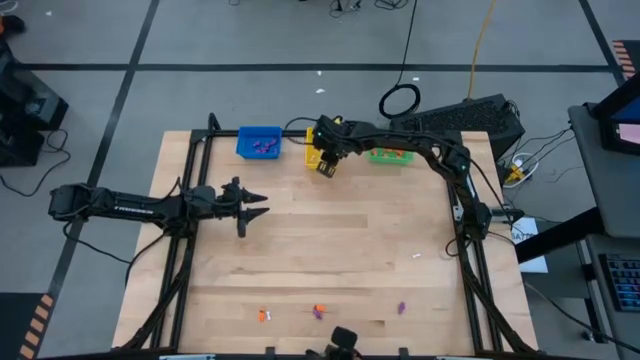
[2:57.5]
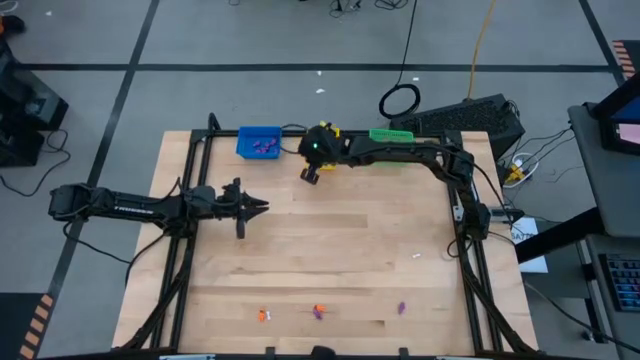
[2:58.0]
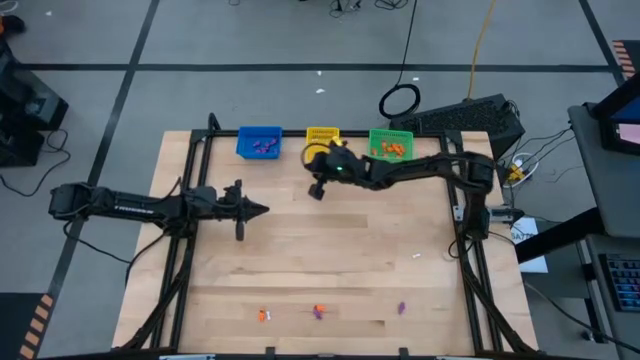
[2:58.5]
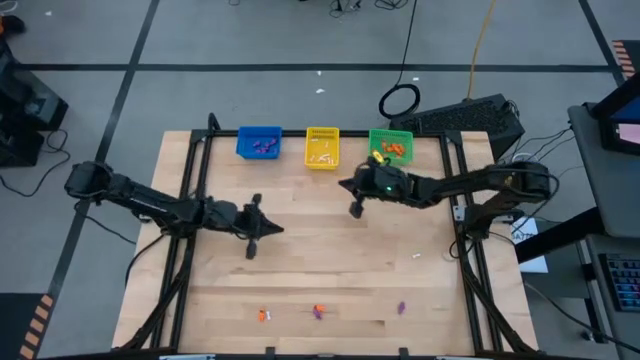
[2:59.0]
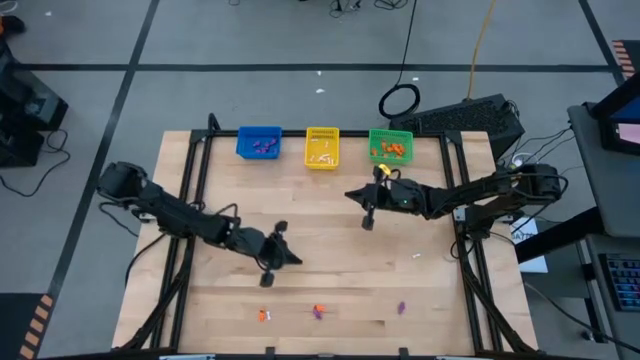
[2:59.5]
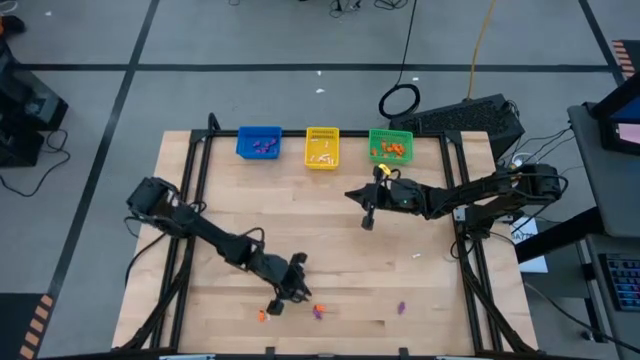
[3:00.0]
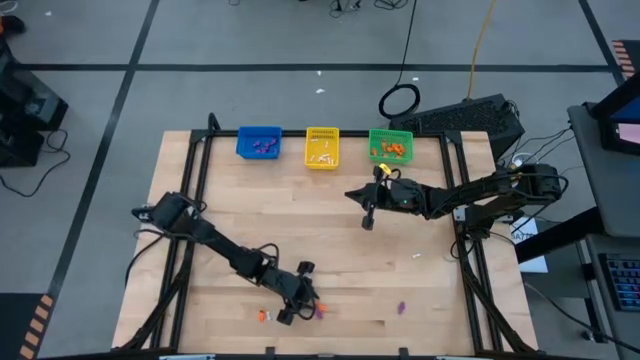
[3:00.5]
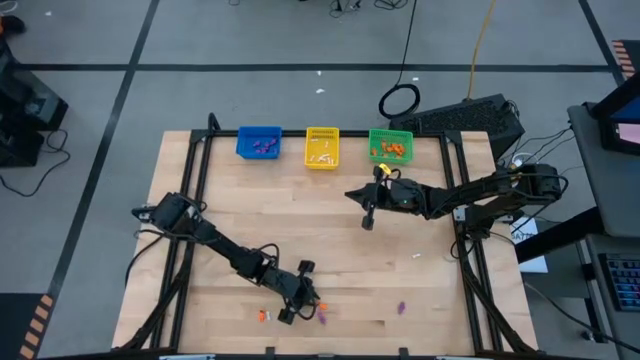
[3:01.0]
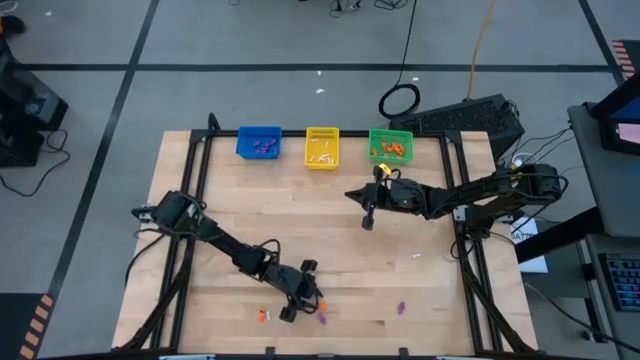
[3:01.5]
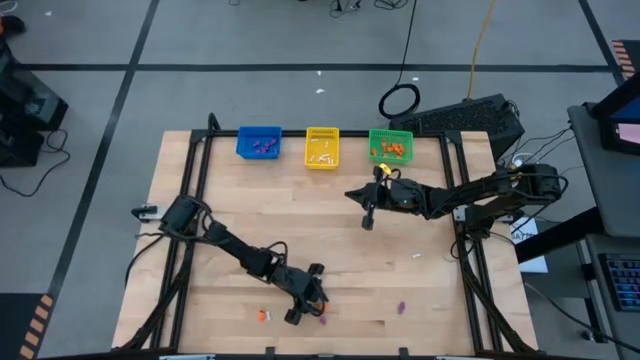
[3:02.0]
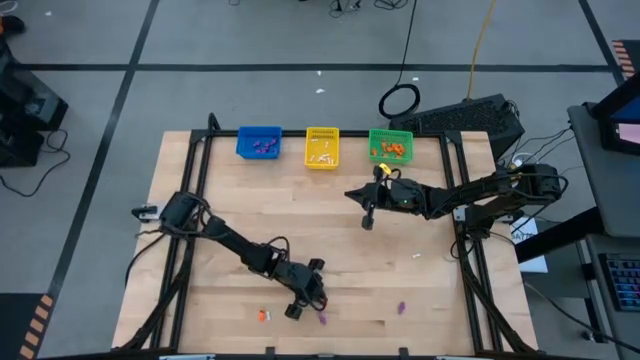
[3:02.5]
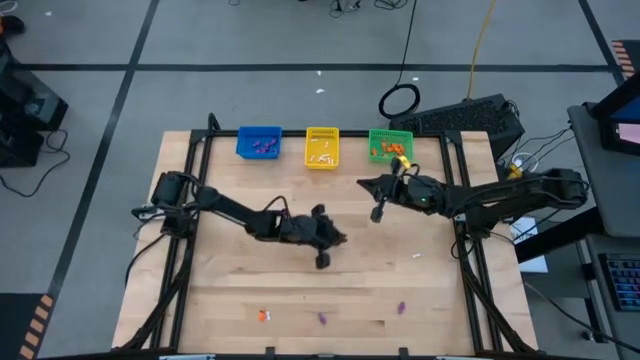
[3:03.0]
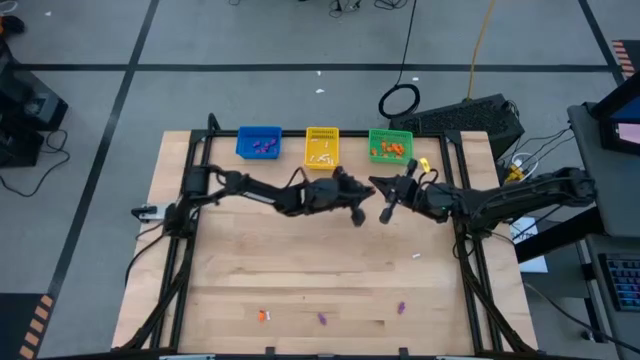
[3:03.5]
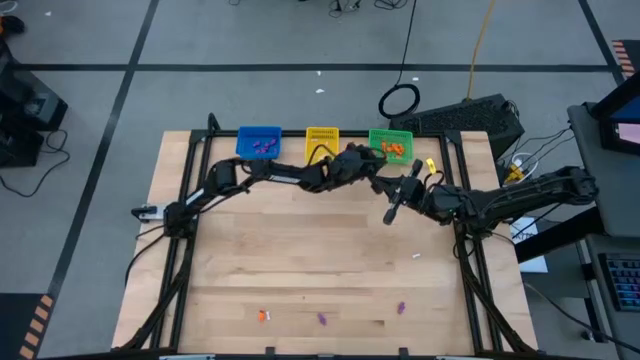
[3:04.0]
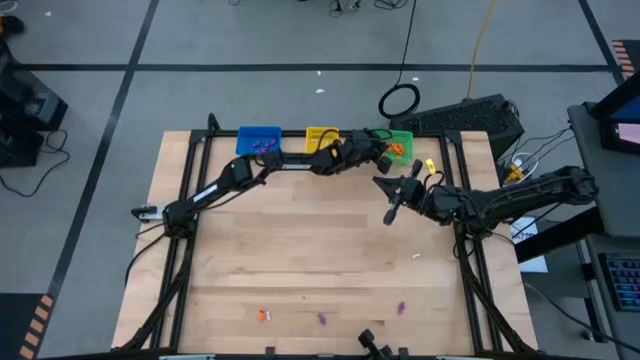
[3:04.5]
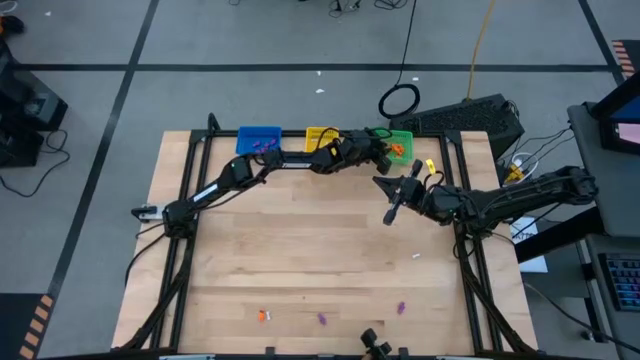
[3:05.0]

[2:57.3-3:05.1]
Task: Sort Halloween decoration
Put the orange skeleton toy into the green bin

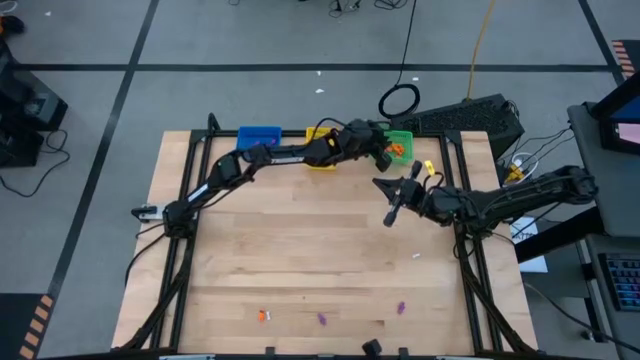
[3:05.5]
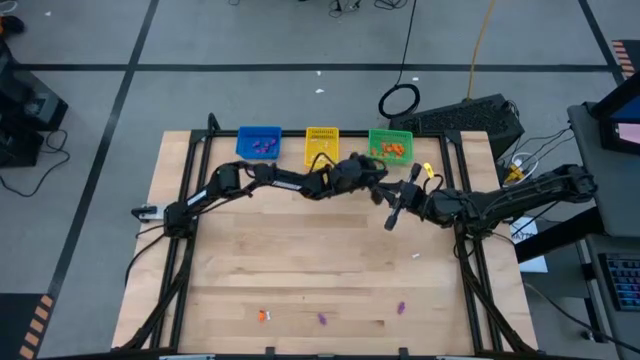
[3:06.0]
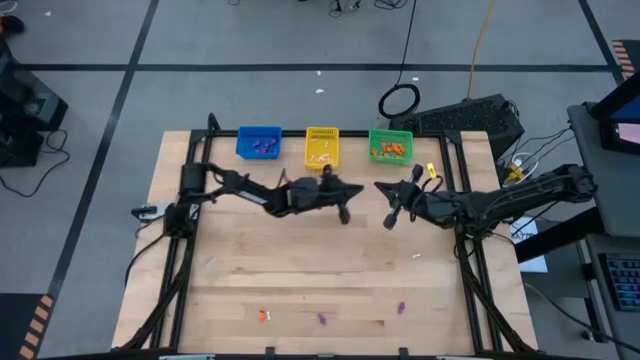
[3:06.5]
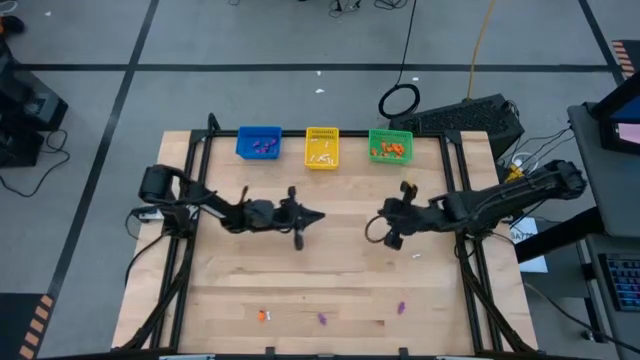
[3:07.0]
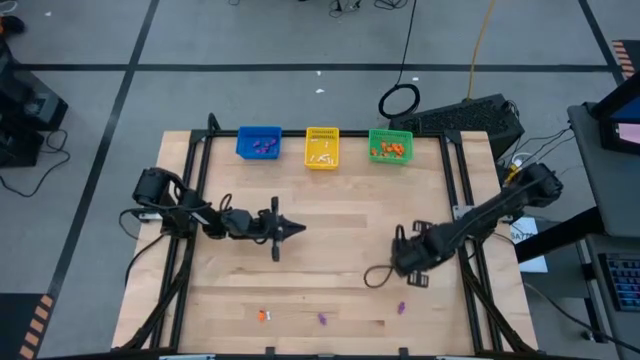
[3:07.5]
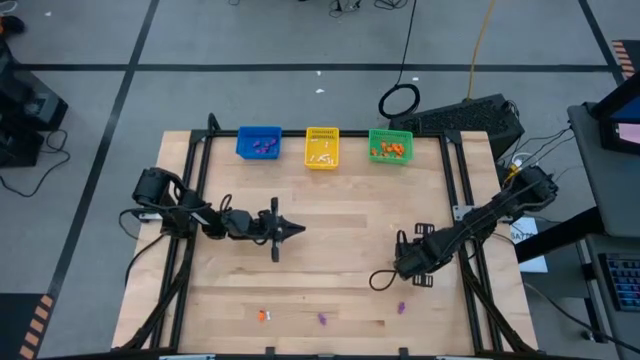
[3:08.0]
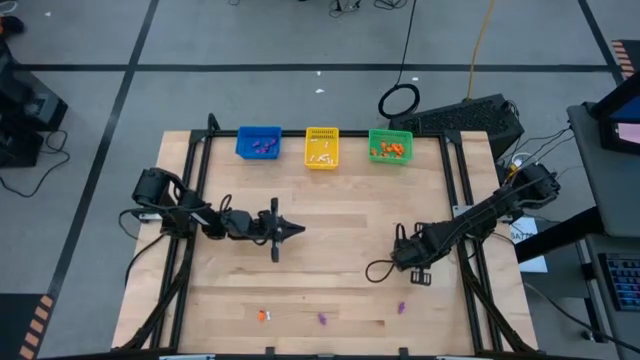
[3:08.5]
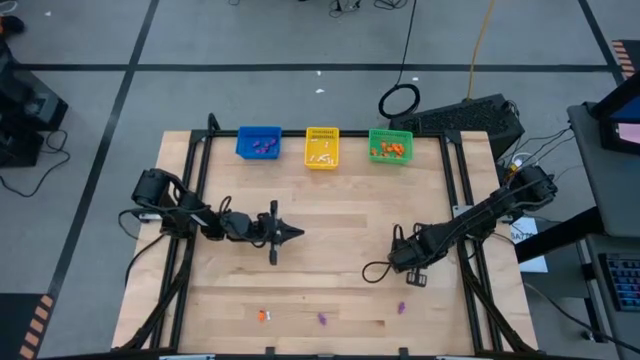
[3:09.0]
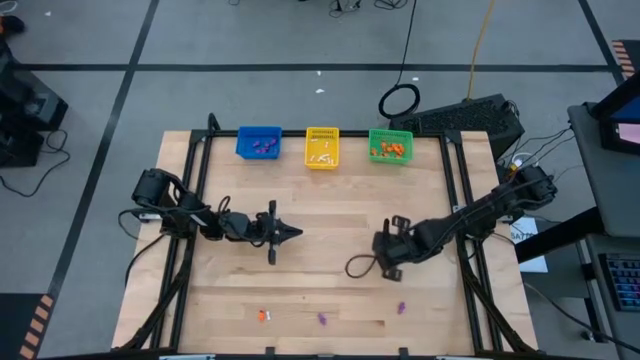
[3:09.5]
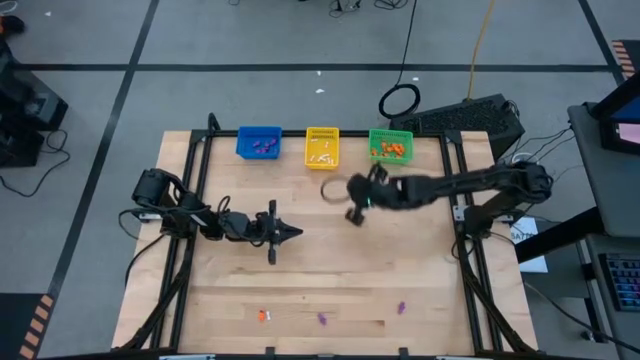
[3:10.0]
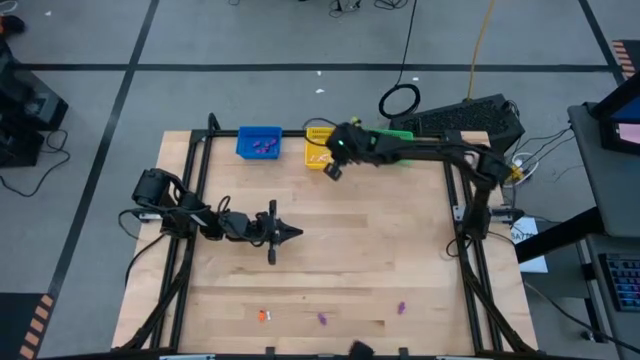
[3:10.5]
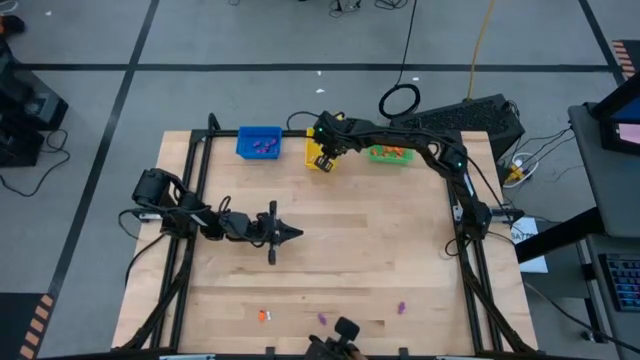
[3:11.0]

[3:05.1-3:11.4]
Put the white bone toy into the yellow bin

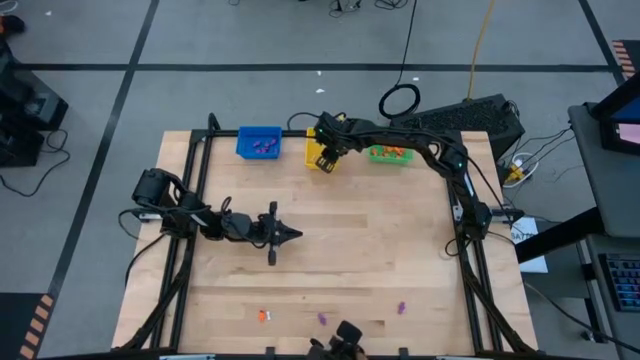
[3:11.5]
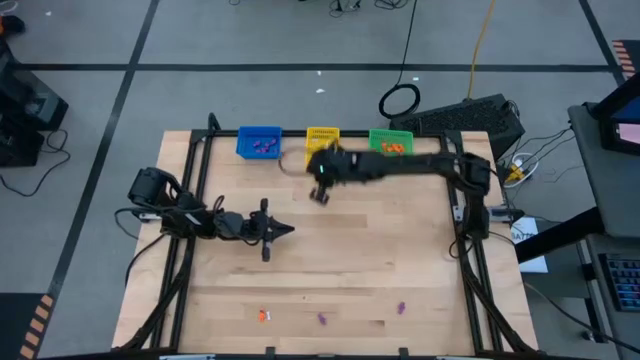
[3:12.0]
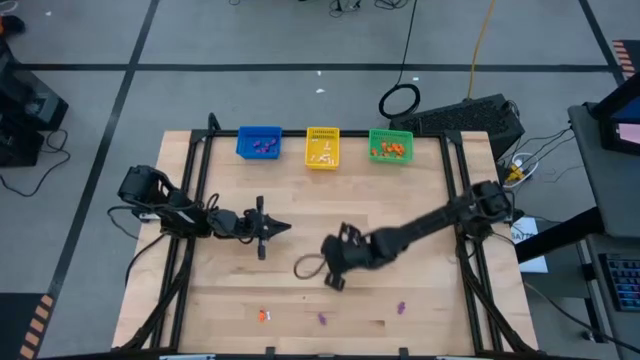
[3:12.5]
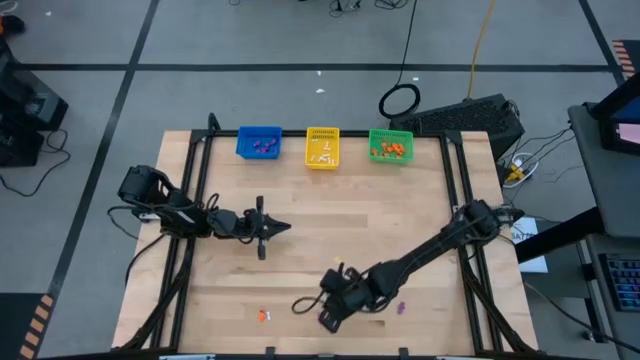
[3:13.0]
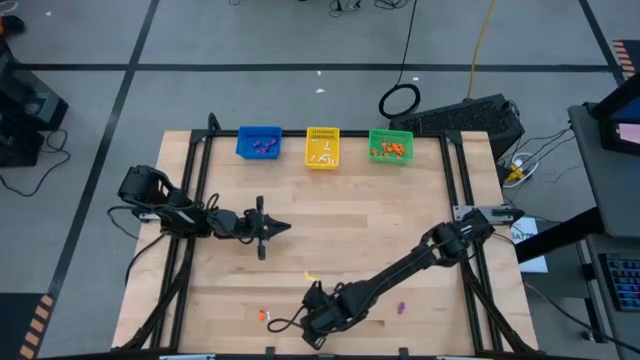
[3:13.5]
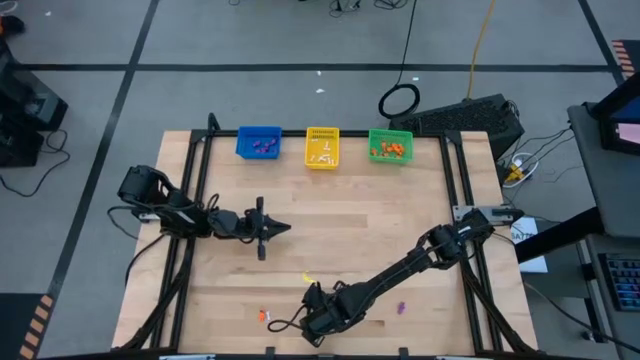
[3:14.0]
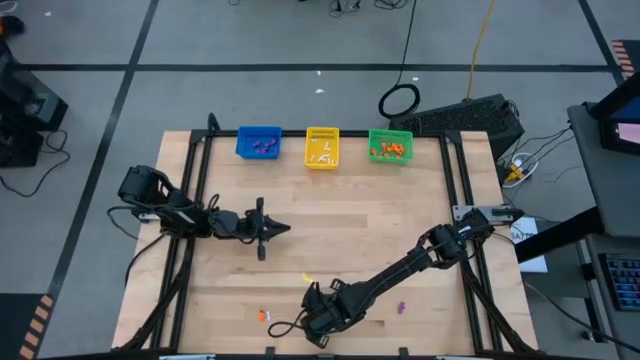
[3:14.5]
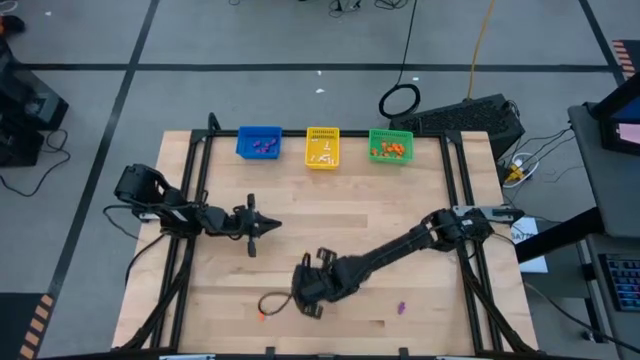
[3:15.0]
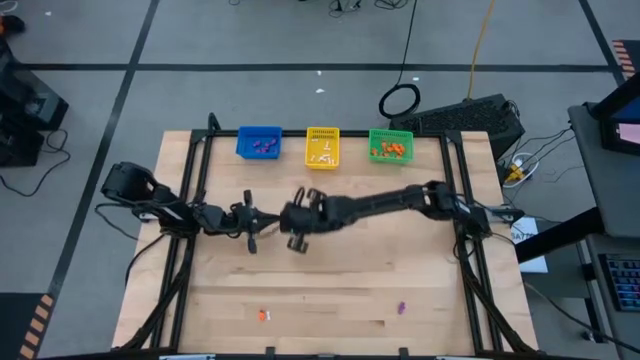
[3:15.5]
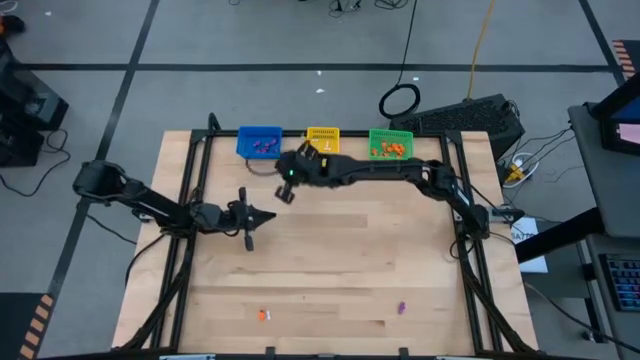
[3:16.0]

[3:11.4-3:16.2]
Put the violet skeleton toy into the blue bin

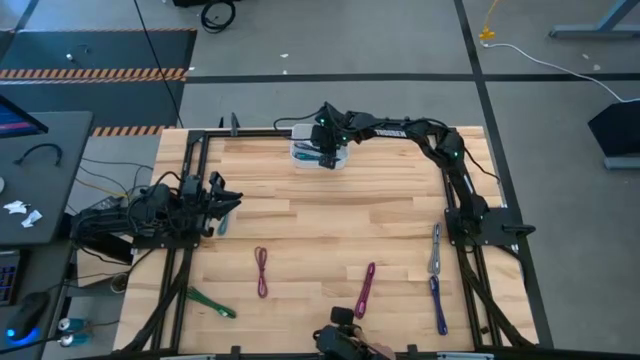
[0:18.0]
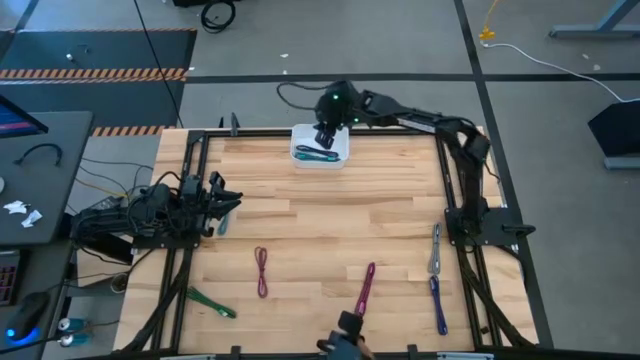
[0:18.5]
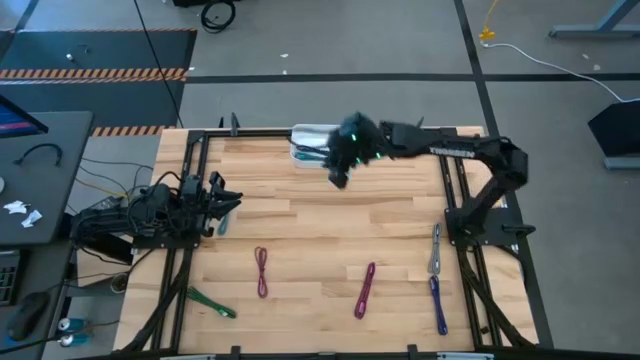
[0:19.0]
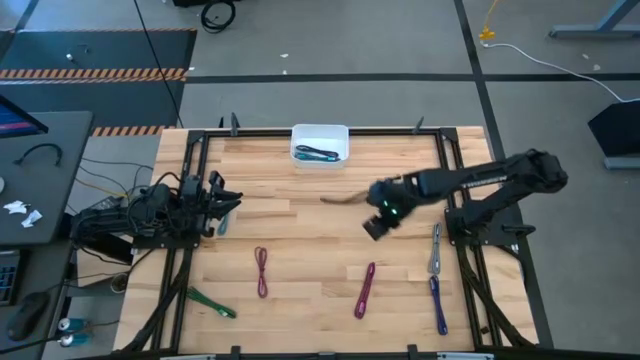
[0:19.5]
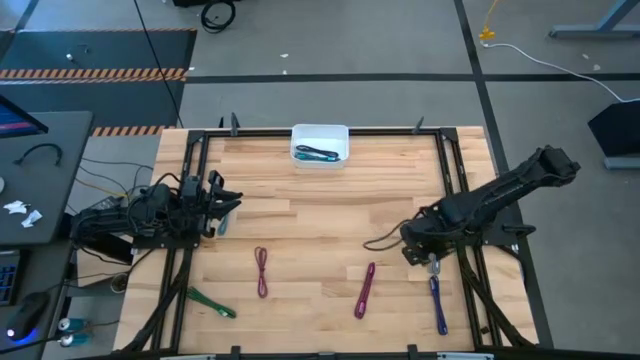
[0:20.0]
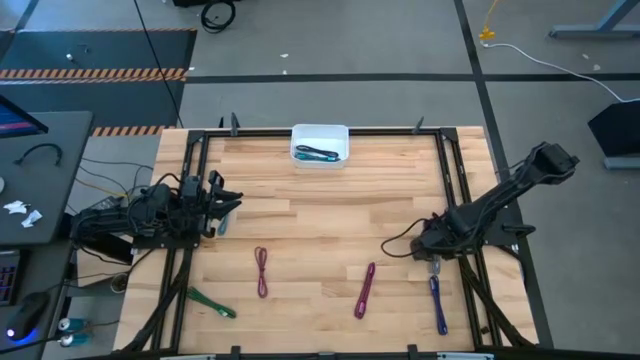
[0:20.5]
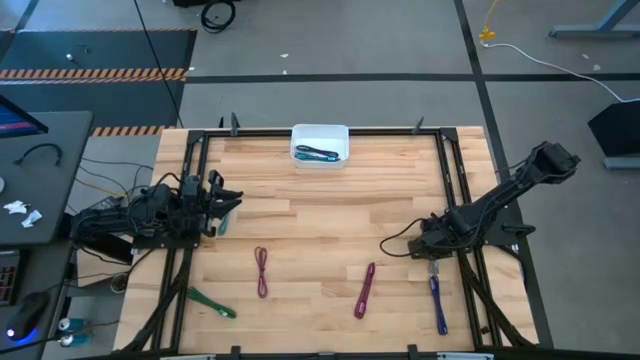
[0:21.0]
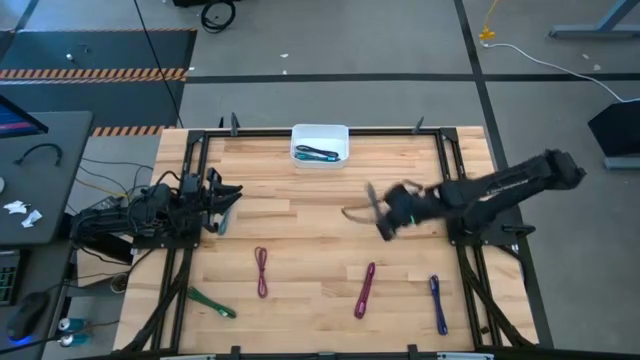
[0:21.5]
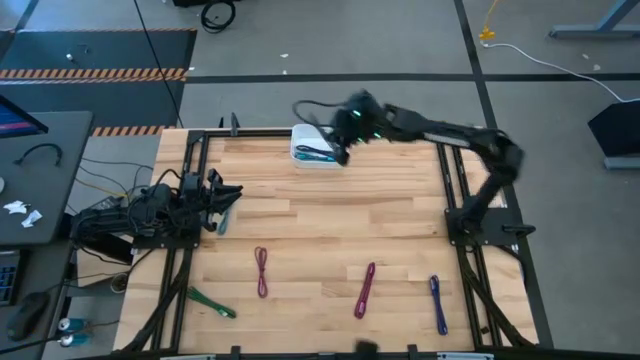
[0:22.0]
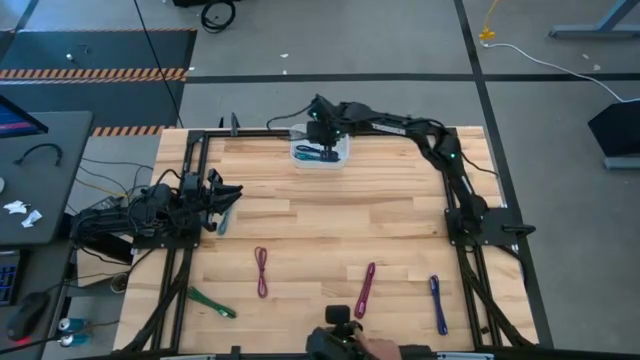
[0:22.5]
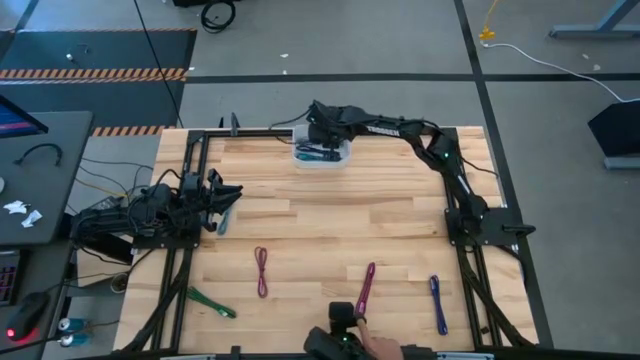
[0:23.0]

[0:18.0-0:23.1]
Task: Pick and place USB-C Cables
Put the white charger cable into the white bin
